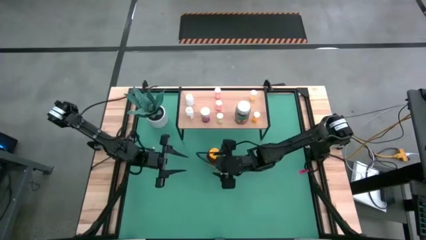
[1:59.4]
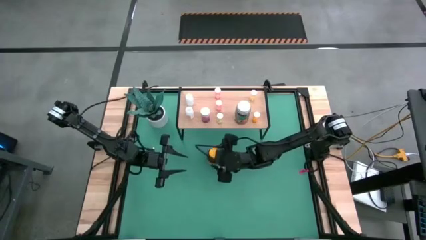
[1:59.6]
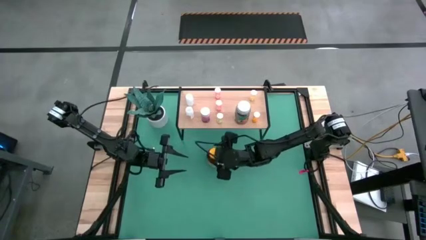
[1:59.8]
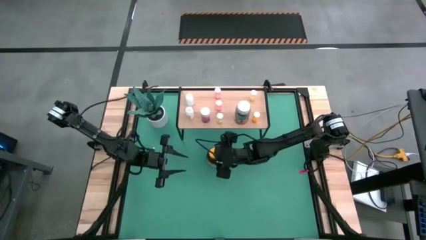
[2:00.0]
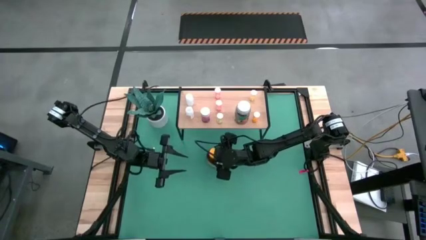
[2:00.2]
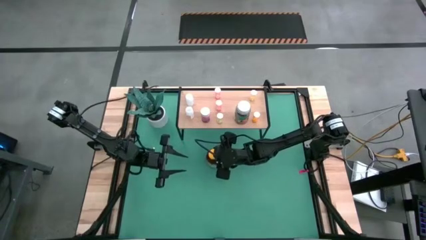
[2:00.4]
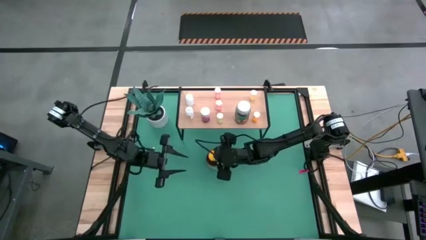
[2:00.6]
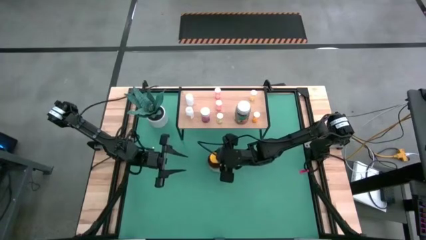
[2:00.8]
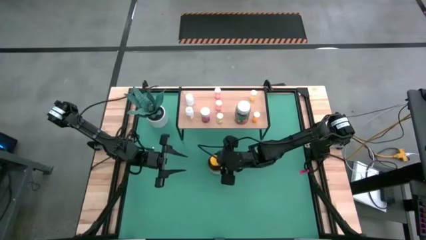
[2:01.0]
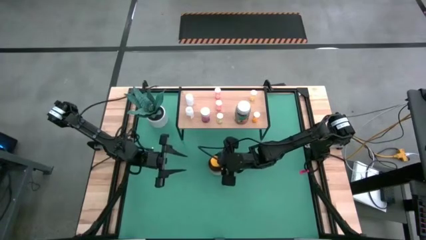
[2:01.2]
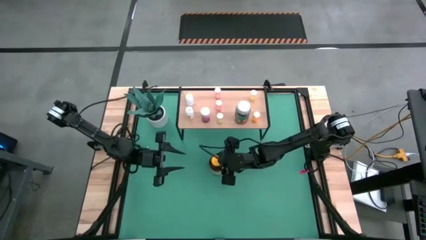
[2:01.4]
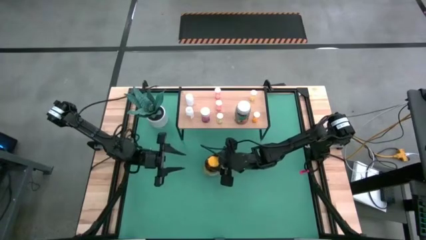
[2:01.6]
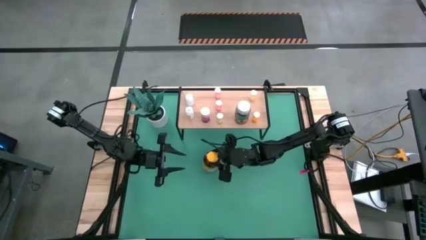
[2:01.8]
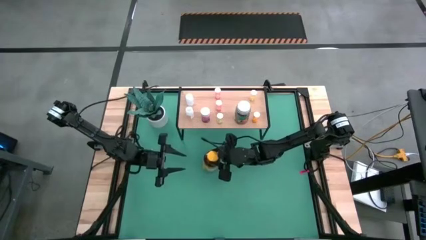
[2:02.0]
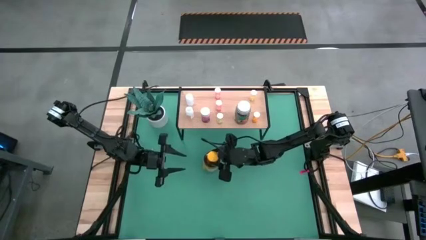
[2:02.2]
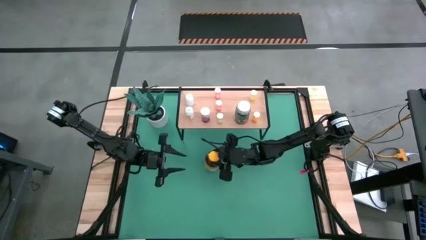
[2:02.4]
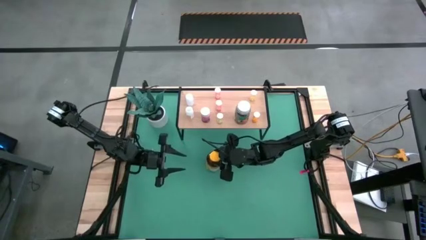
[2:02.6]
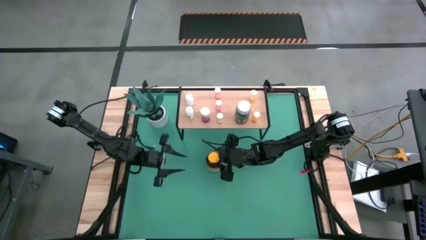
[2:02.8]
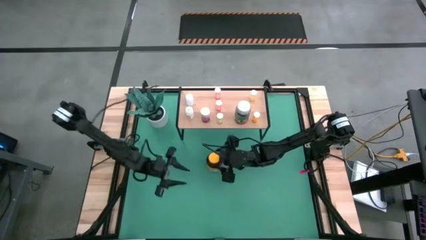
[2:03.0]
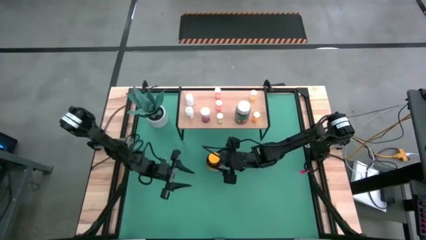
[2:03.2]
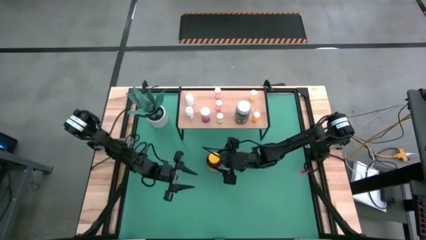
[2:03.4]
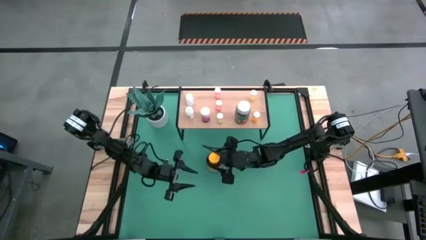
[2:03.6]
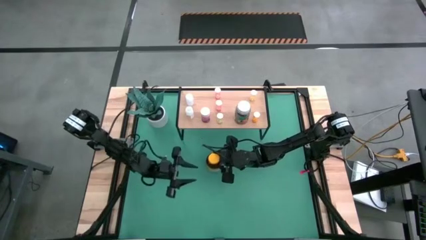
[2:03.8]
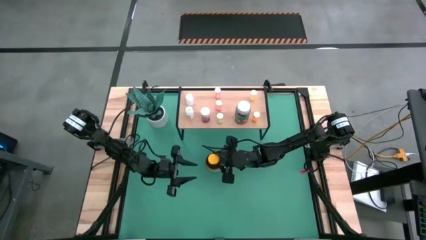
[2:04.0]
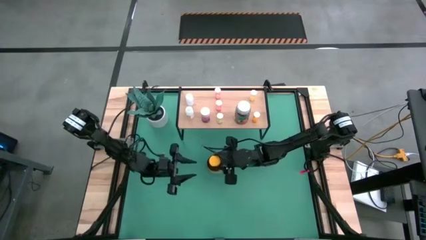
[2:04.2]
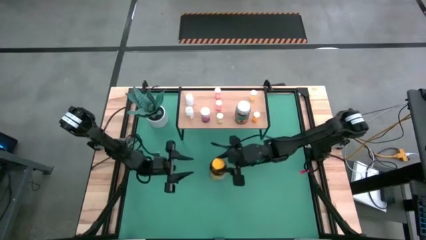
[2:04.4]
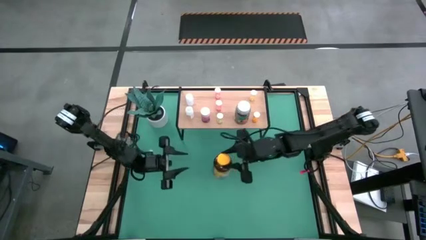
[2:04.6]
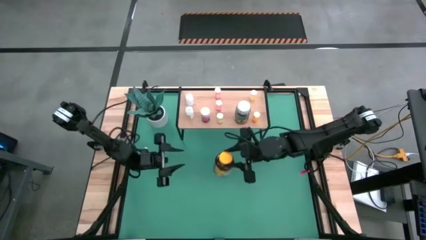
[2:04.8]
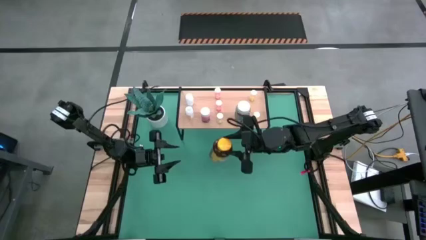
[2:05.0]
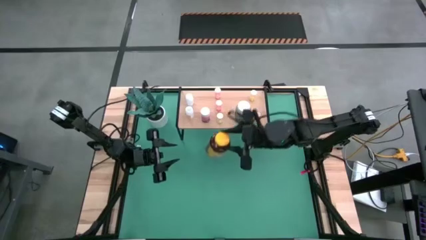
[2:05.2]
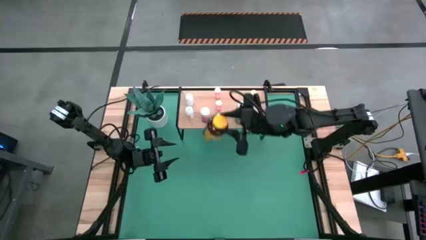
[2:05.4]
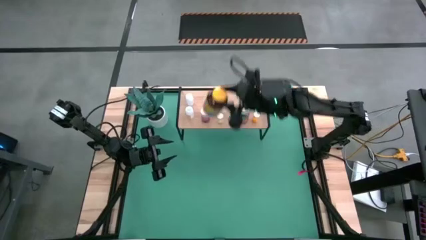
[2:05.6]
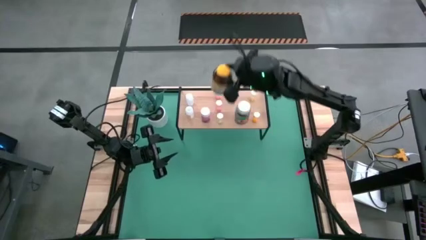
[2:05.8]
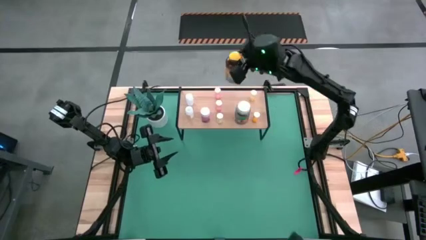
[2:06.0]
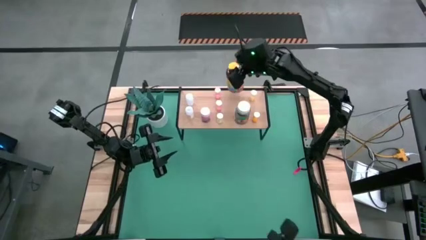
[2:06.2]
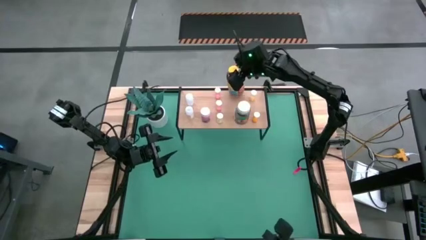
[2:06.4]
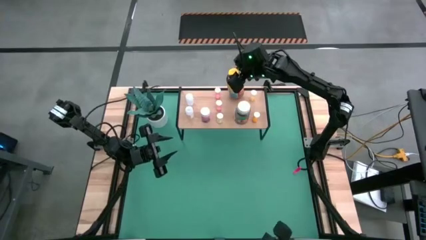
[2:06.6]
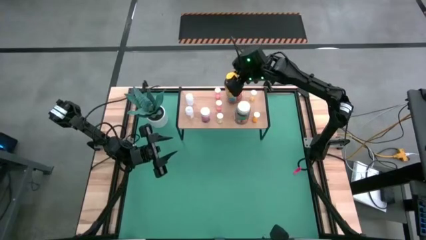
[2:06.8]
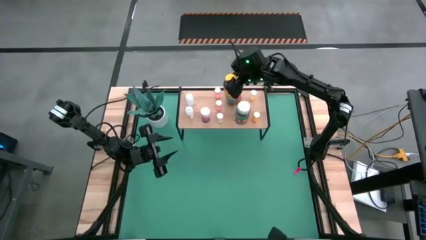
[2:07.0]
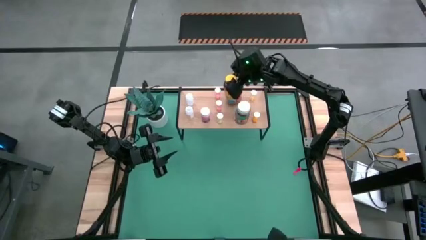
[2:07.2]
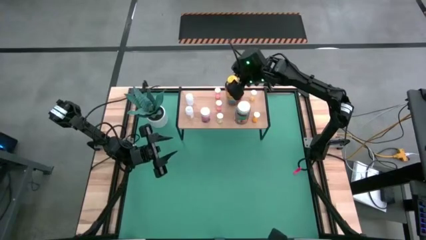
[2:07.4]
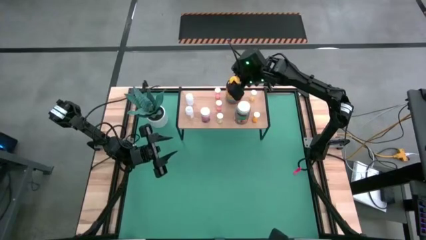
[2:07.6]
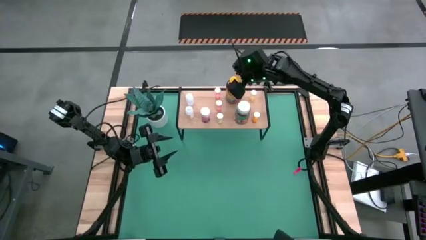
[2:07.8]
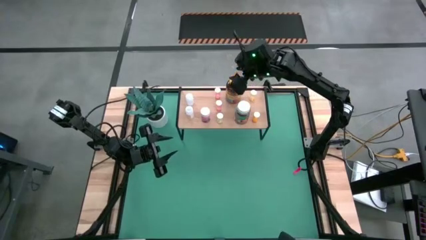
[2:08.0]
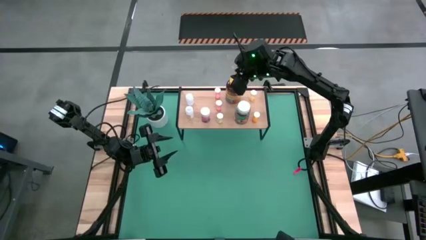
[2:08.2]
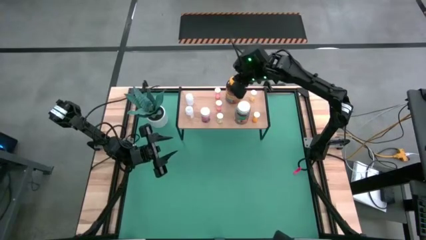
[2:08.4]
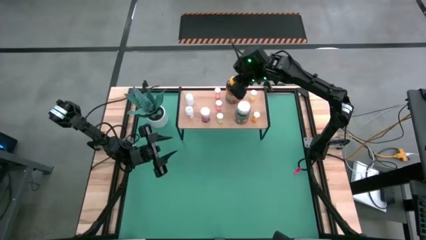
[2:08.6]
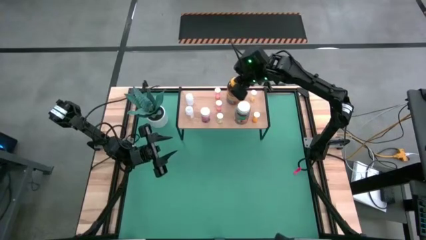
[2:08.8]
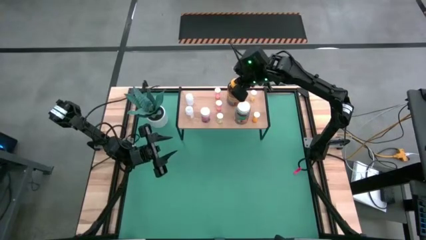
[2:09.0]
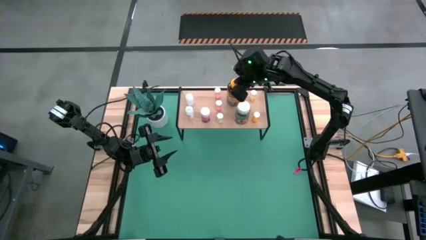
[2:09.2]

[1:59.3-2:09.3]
Task: Pick and place medicine bottles onto shelf by color
Put the yellow and brown pill bottle on the shelf

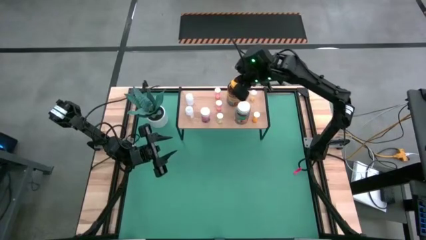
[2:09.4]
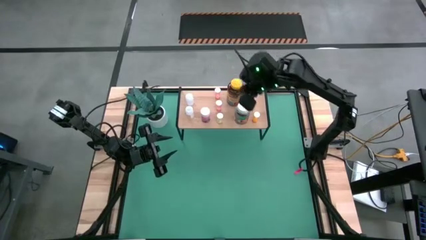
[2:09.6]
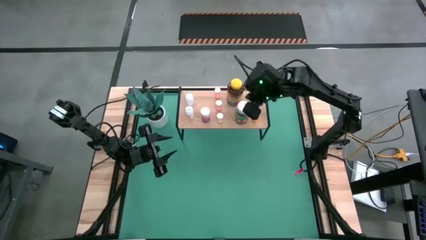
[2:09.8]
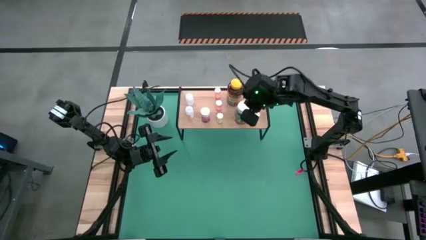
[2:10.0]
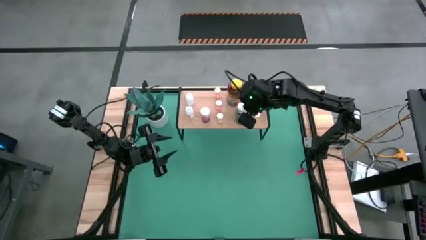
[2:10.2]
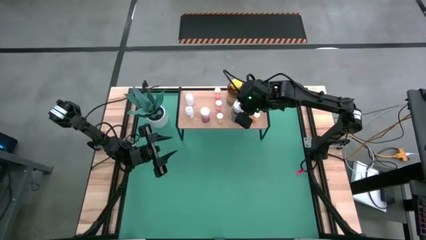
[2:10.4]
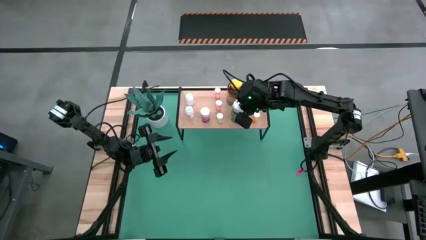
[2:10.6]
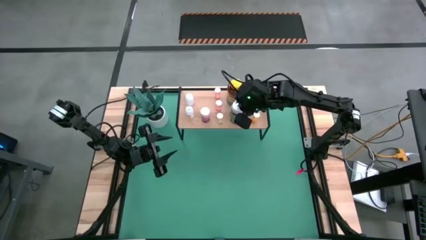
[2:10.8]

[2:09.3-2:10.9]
Adjust the green pill bottle on the shelf

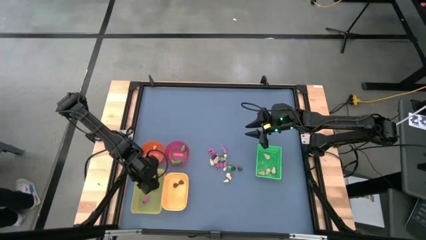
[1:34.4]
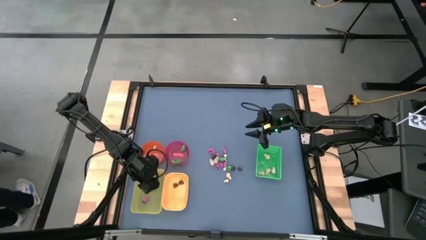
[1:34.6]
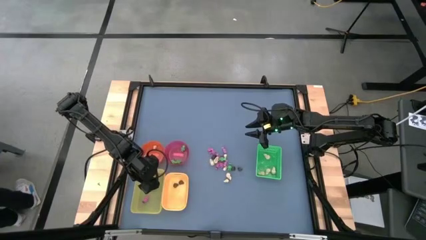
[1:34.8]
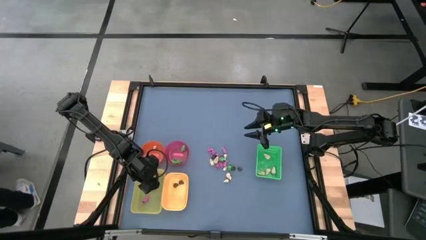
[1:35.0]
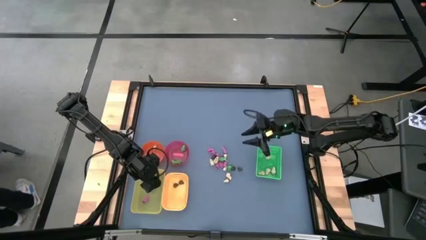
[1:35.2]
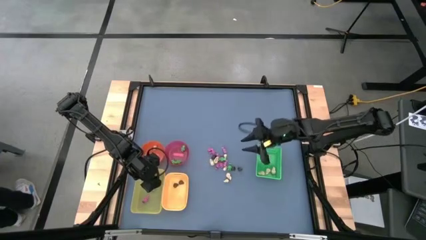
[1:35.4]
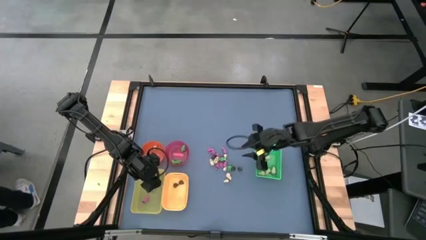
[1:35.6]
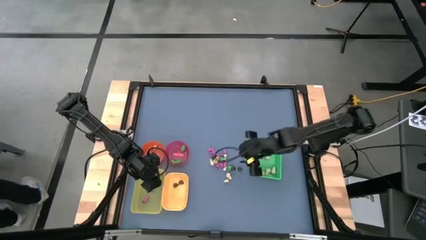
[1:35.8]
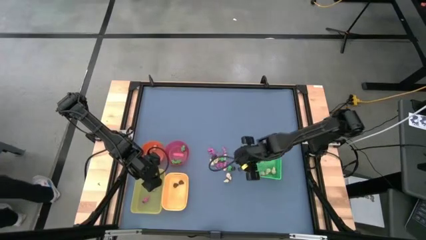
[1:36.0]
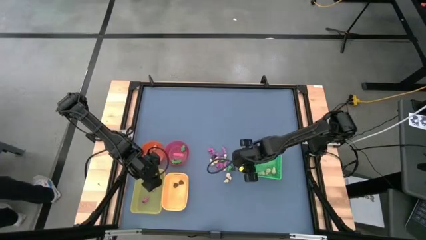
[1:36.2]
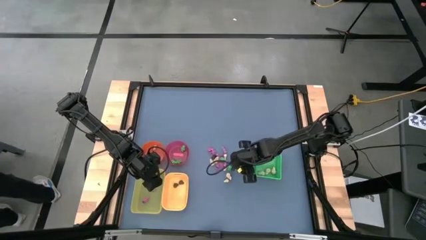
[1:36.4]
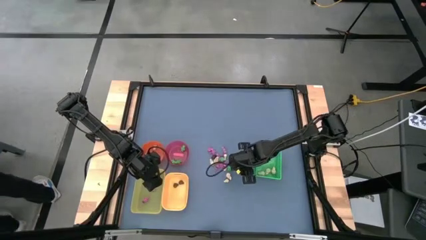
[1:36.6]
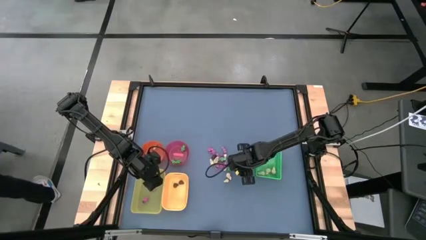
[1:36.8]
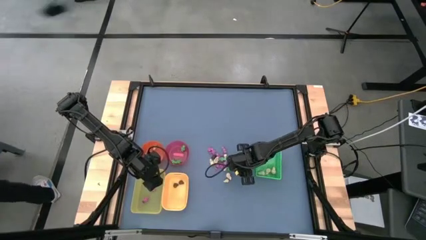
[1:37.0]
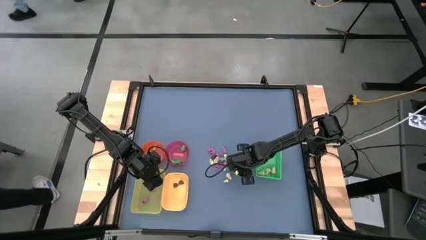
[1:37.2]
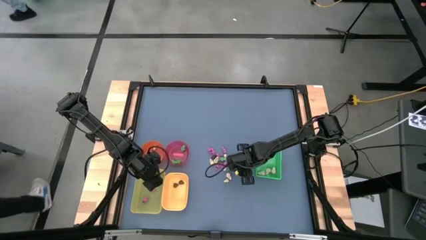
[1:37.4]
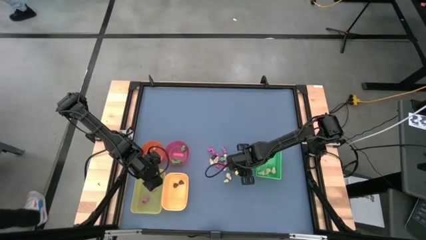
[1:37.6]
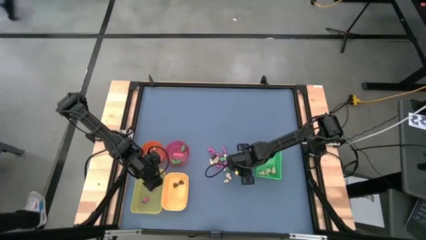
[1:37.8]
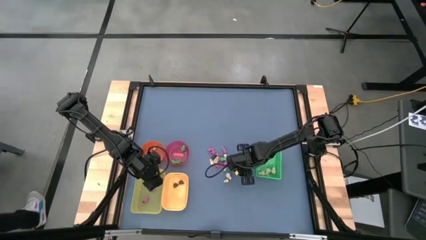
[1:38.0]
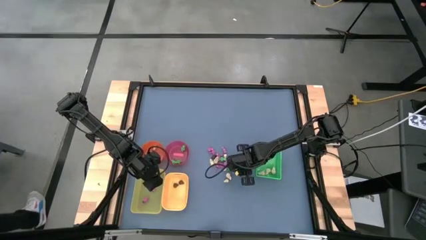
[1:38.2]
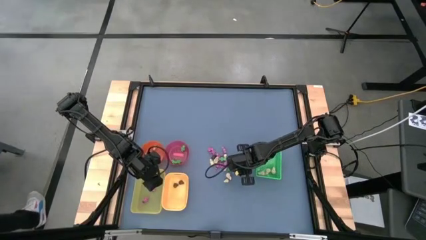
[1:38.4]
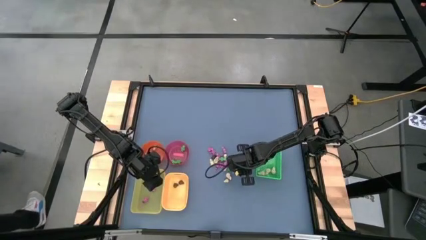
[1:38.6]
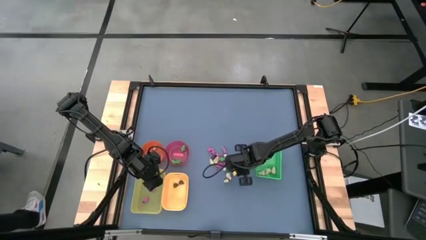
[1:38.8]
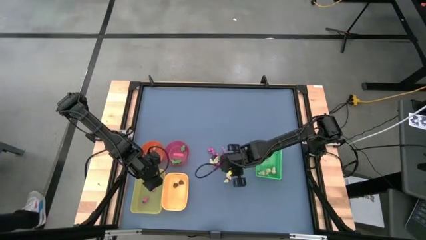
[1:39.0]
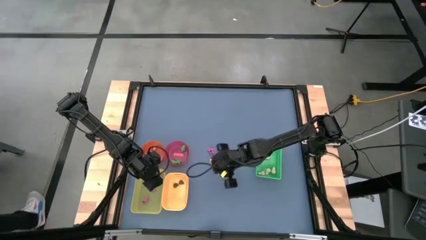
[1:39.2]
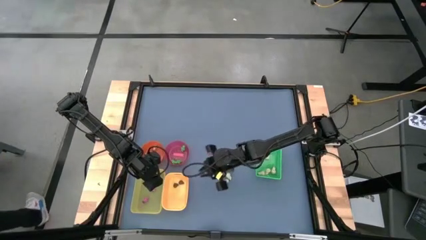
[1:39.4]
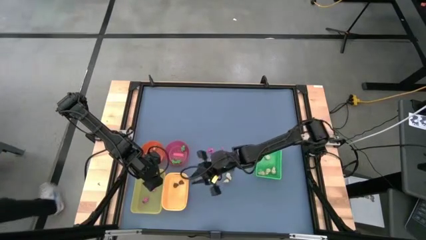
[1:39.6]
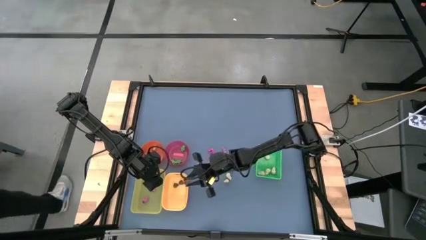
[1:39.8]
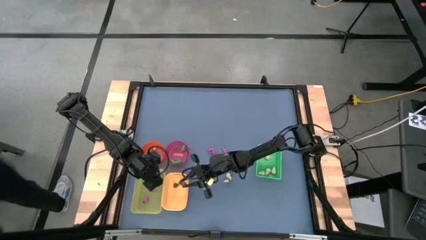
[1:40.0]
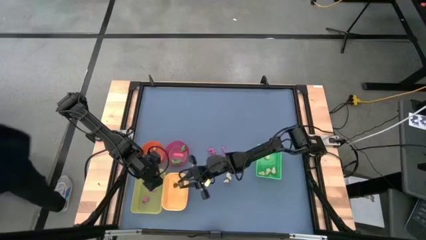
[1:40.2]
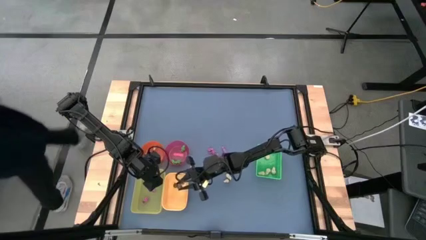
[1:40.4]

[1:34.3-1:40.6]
Task: Sort Halloween decoration
Put the black skull toy into the yellow bin
